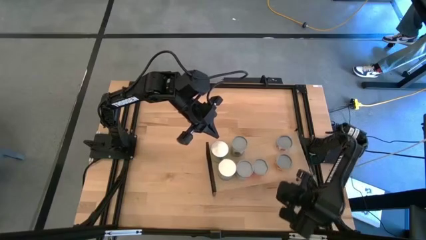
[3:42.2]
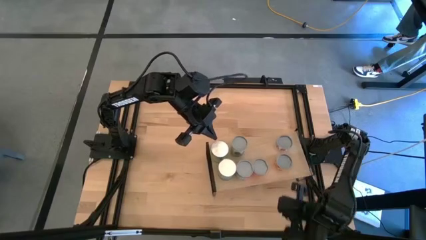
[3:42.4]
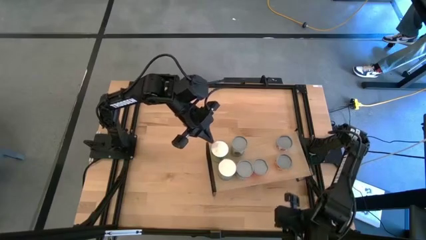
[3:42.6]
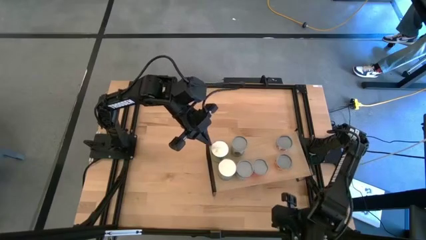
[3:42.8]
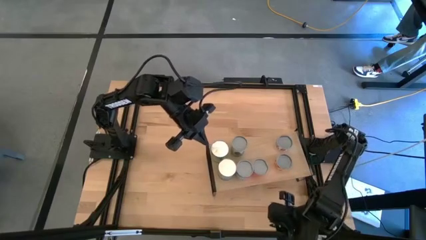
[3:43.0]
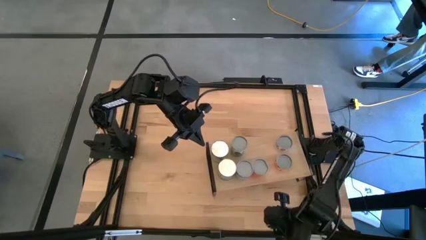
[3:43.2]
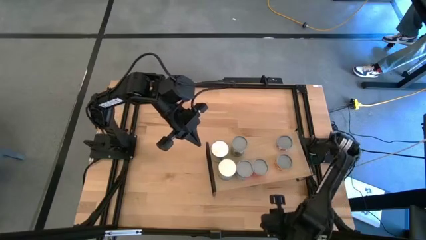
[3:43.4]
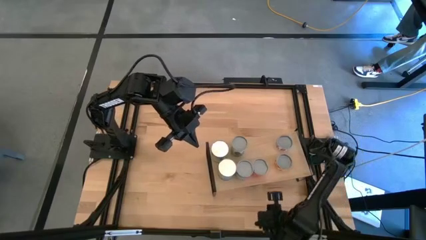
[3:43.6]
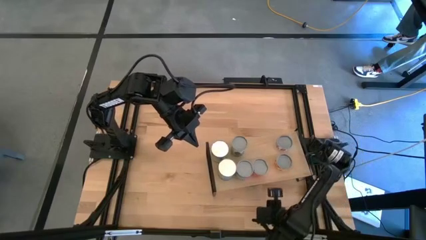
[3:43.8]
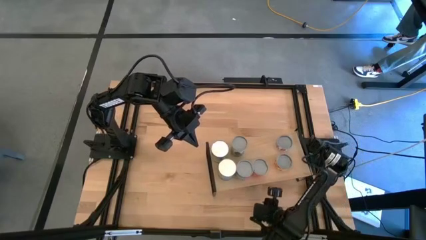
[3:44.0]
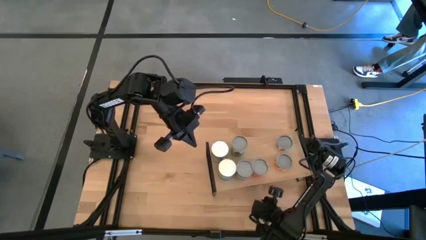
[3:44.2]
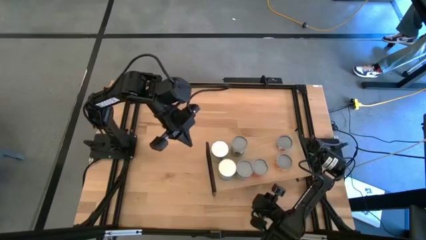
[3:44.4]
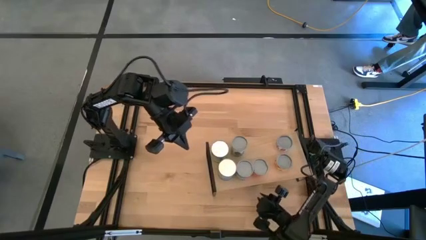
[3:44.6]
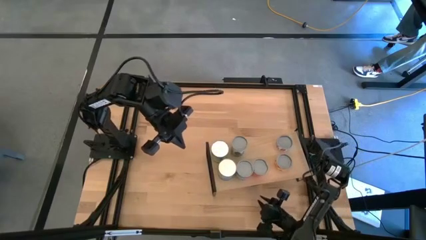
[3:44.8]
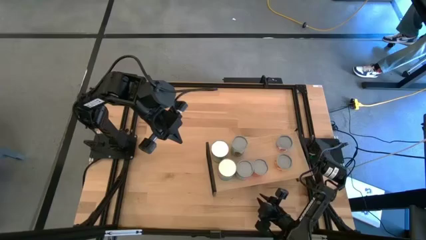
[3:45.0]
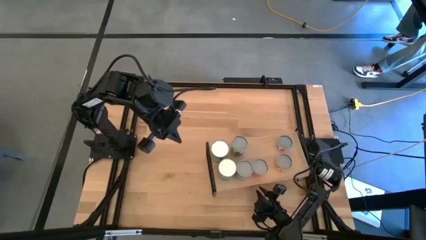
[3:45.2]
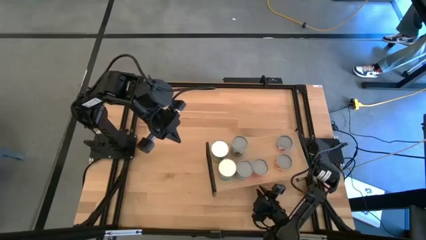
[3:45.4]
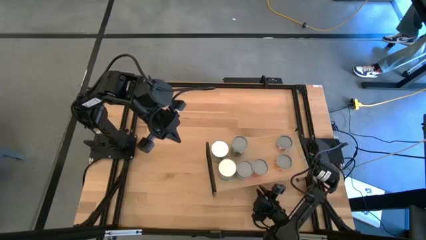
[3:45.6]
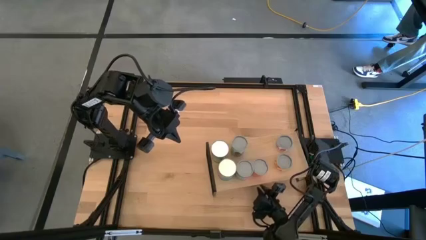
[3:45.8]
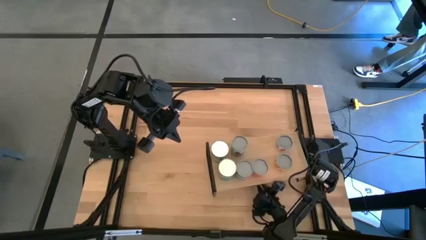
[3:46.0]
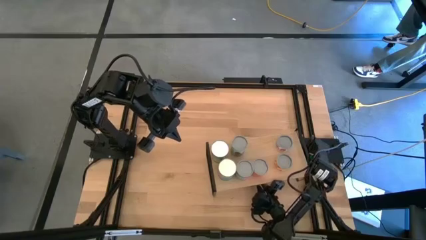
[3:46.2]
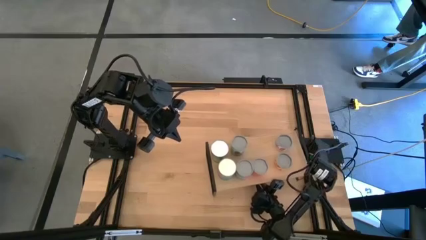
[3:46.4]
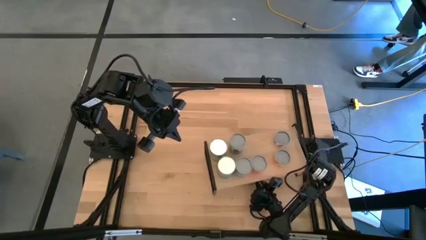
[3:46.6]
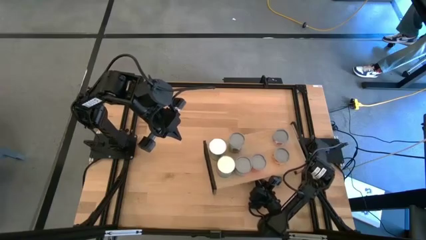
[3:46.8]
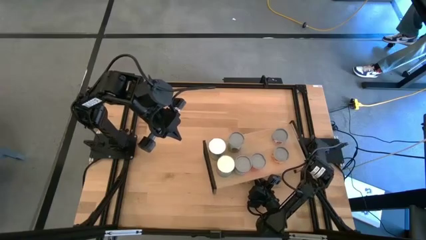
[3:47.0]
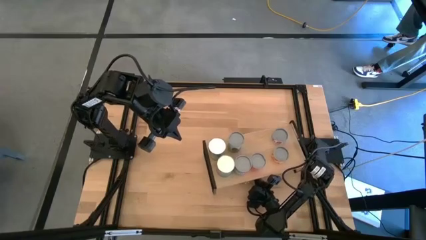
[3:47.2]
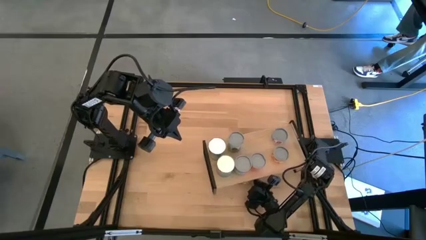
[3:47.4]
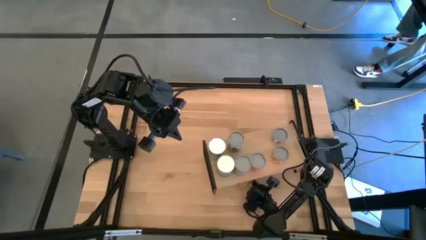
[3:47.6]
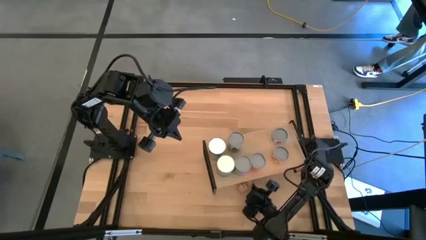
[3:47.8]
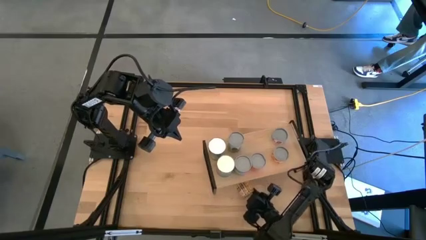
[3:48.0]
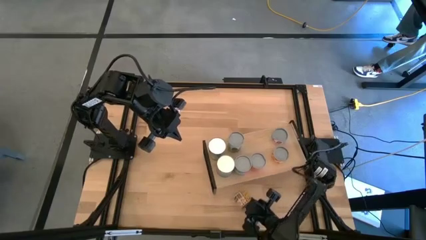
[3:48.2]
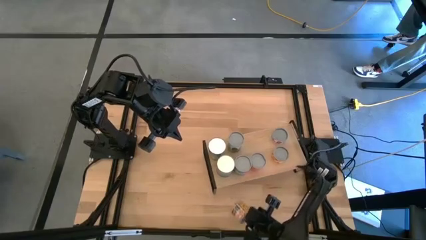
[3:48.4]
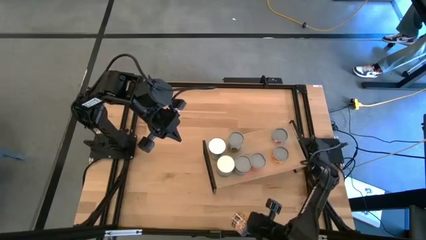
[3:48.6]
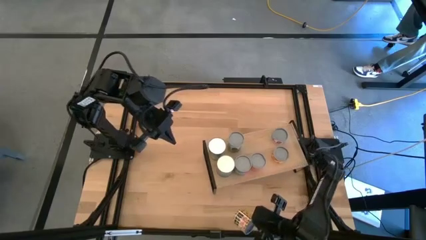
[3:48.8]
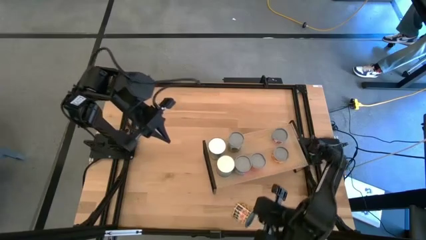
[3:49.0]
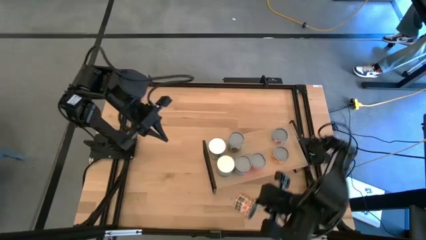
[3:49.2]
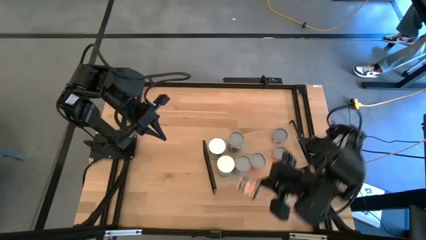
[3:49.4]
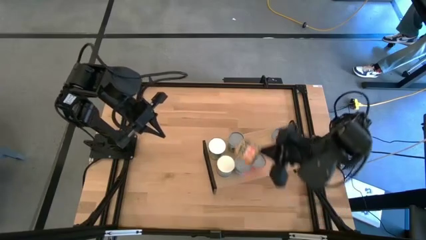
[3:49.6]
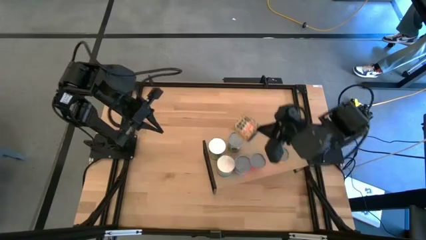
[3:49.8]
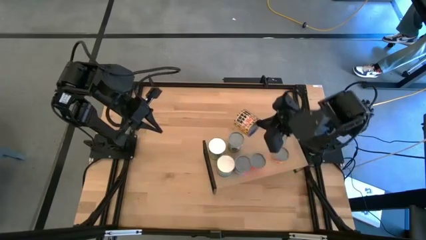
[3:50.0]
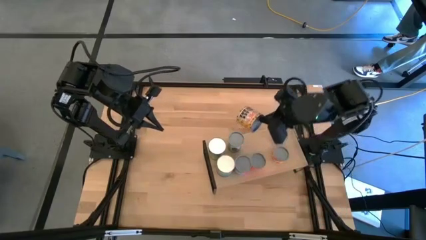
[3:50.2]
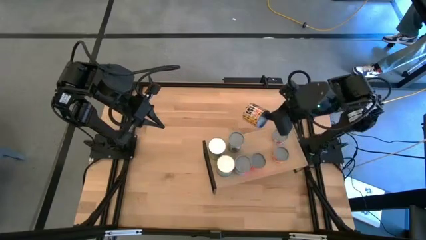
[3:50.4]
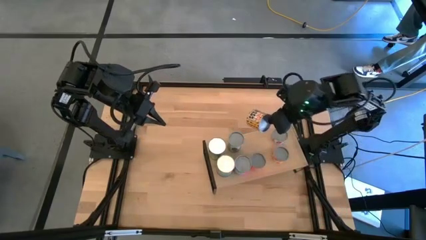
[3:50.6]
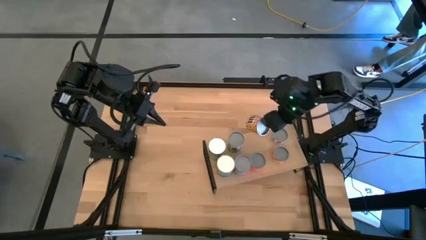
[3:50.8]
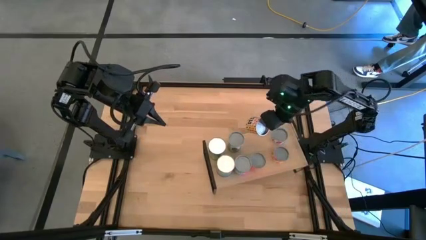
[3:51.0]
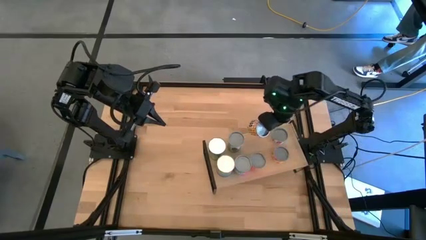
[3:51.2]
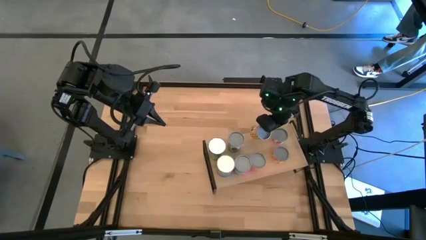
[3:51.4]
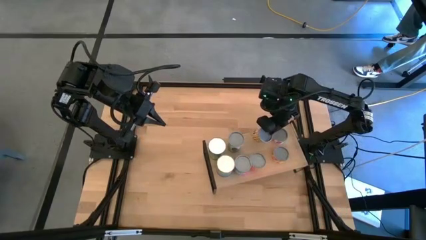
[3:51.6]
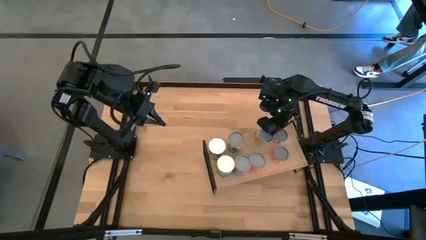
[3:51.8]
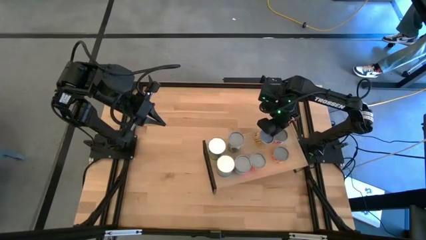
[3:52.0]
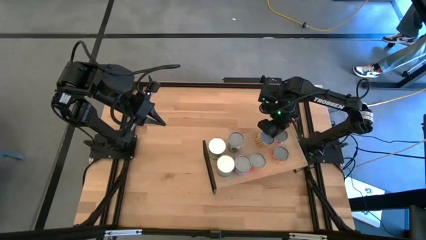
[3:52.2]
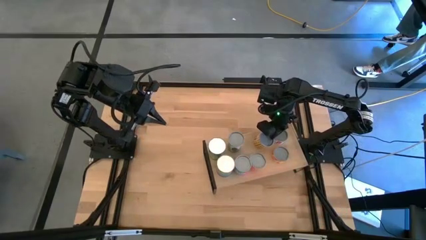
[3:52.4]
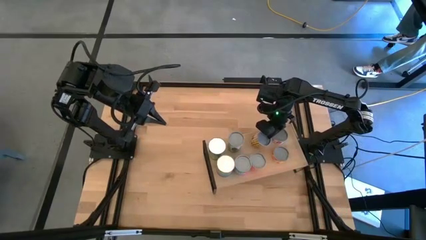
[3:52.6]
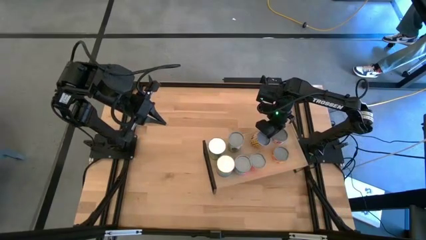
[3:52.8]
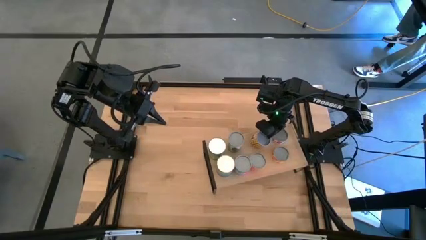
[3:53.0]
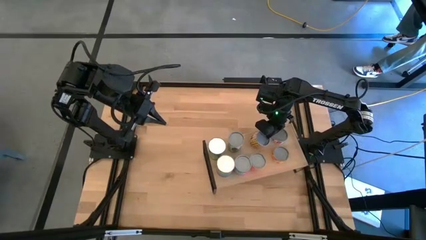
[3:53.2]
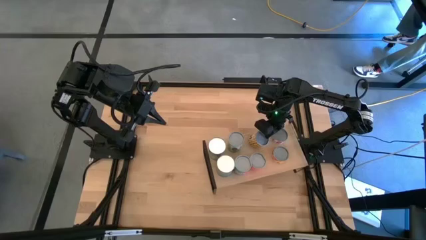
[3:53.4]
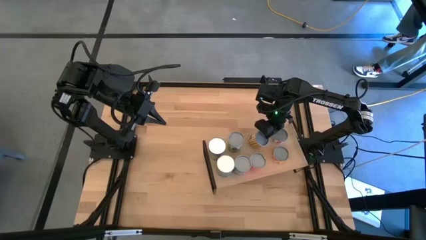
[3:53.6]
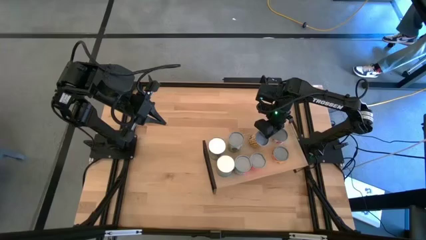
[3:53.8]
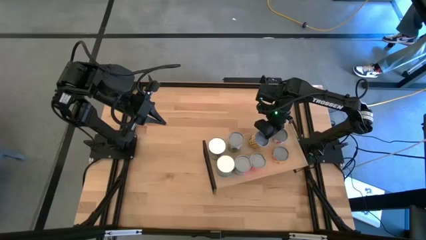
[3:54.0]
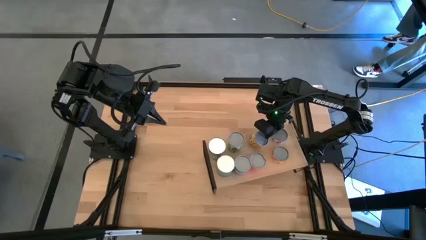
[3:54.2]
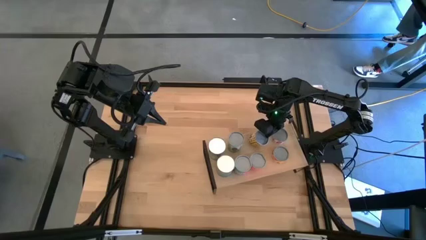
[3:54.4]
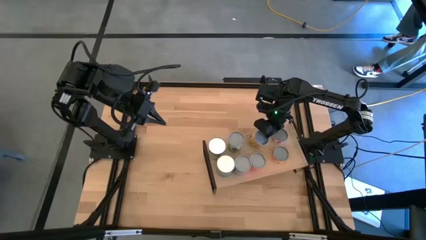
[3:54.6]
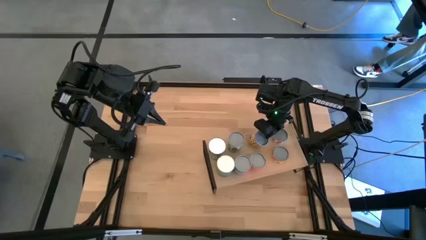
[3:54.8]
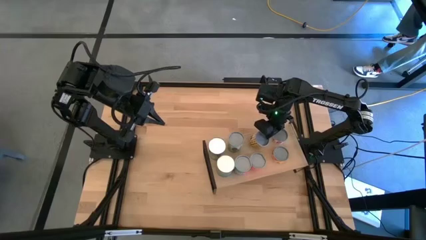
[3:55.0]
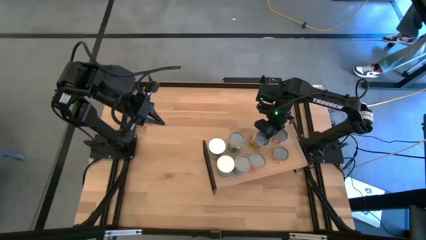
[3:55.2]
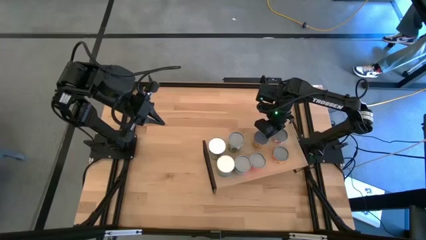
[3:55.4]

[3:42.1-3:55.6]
Task: Pick and place cans onto a shelf
Put the canned spicy black beans on the shelf
